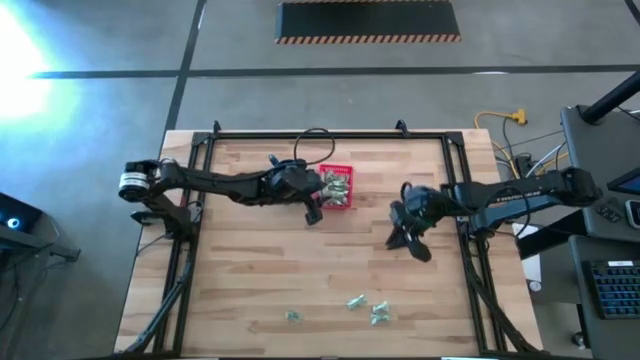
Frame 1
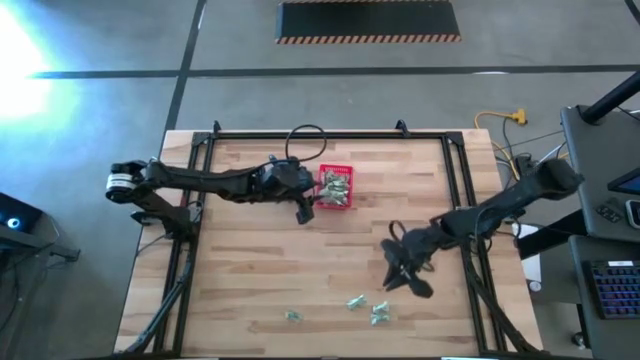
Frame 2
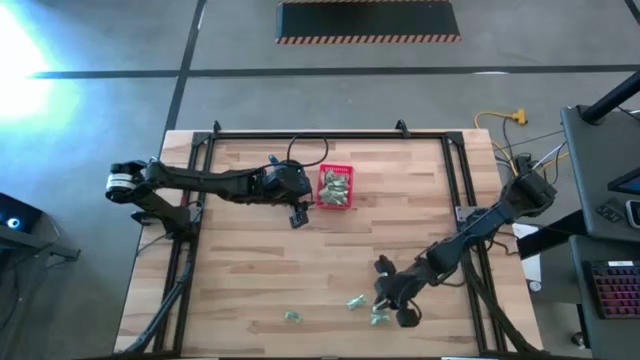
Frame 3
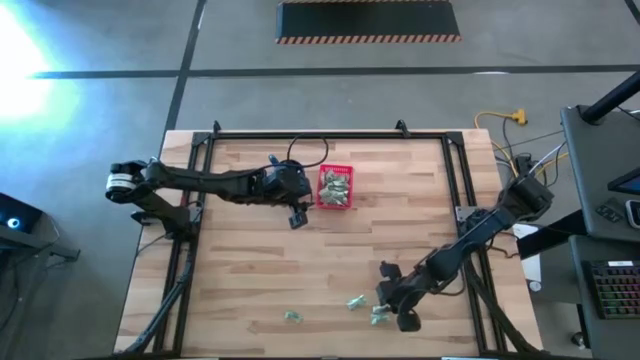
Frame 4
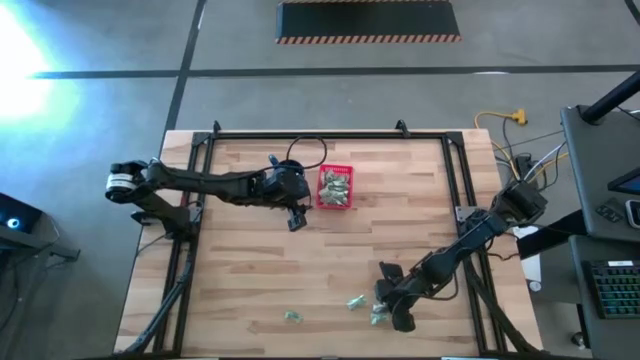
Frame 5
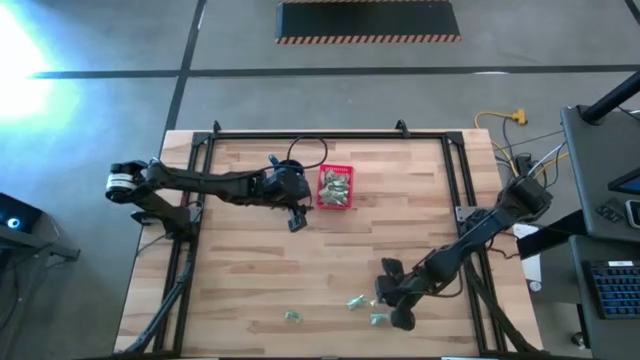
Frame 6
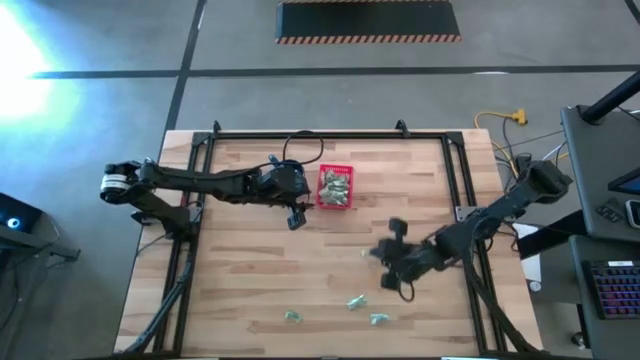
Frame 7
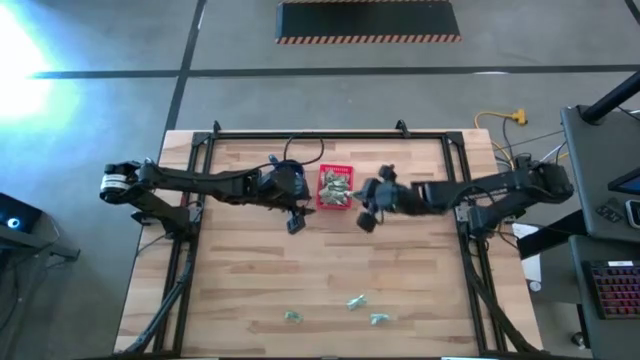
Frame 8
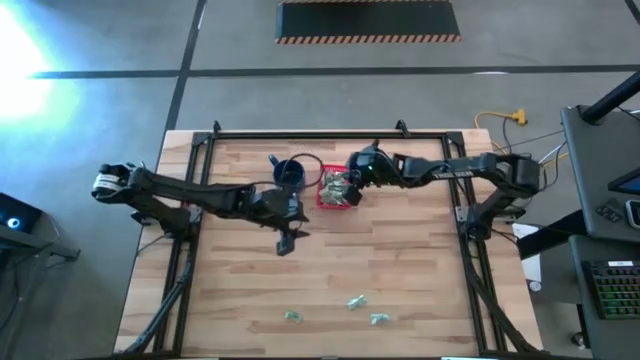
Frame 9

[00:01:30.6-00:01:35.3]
Task: Pick and place Stevia / Truvia into bins
Put the stevia packet into the basket

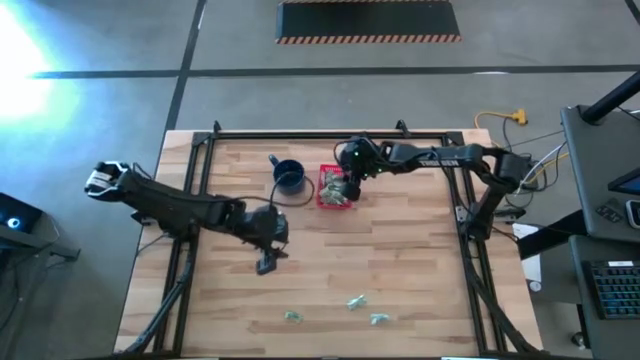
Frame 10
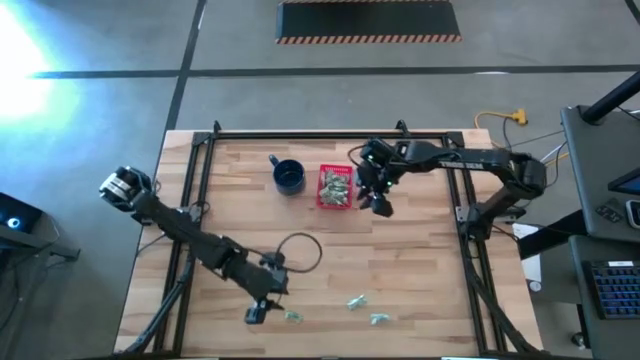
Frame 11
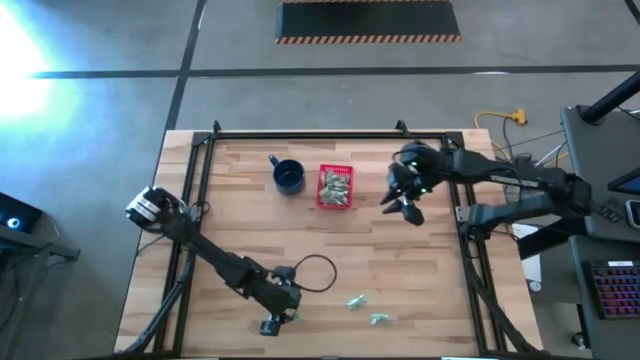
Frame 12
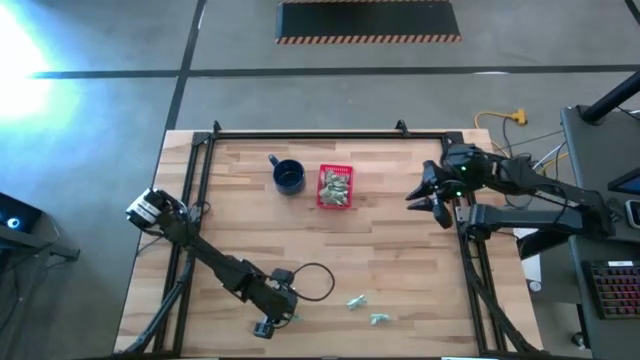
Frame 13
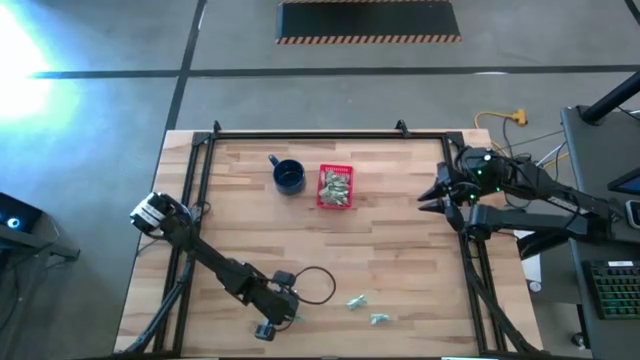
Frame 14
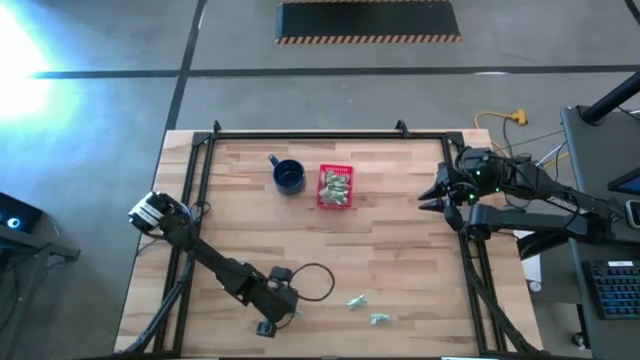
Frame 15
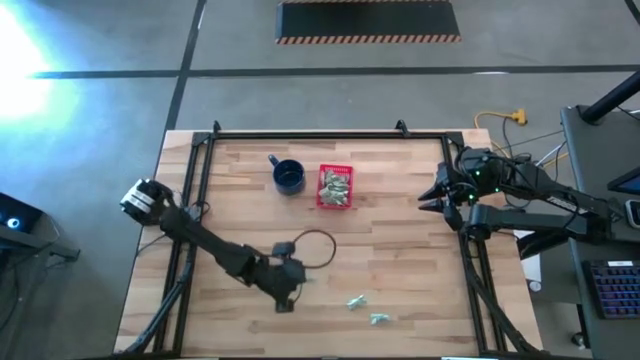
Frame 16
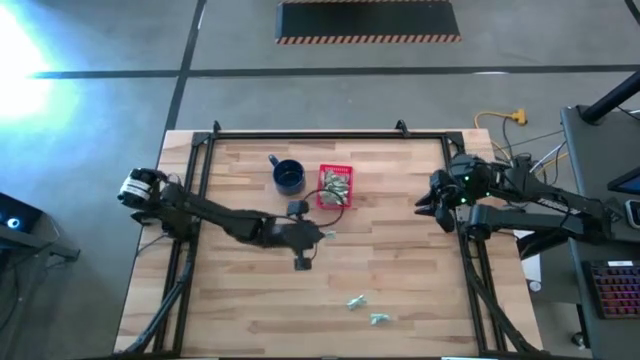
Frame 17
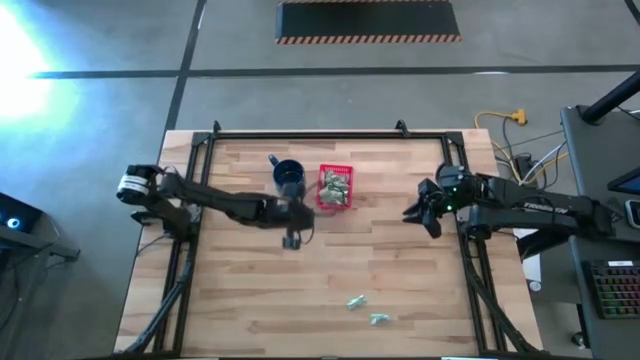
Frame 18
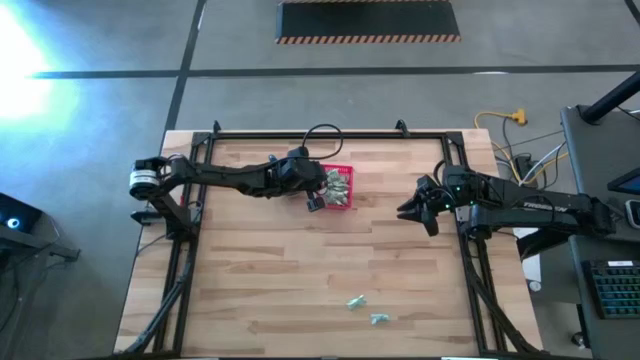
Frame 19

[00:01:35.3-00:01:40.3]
Put the stevia packet into the basket

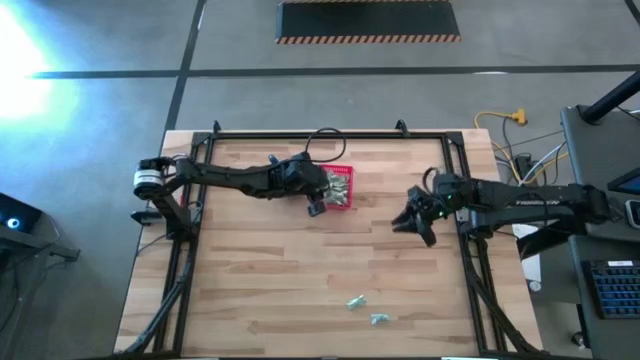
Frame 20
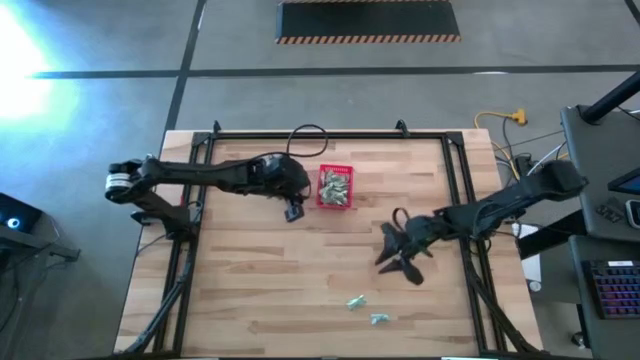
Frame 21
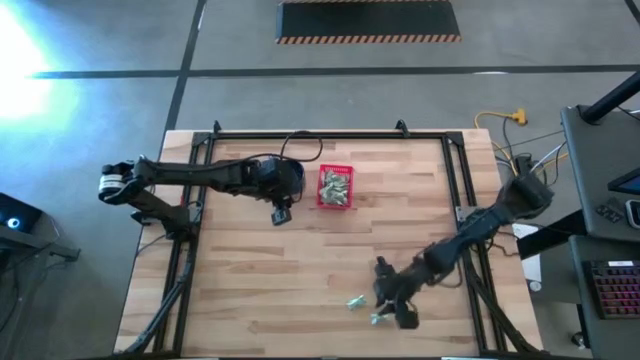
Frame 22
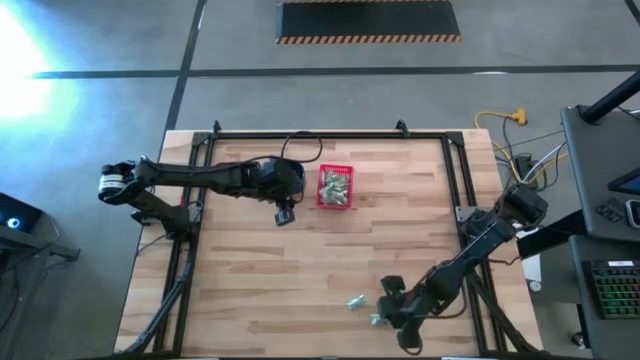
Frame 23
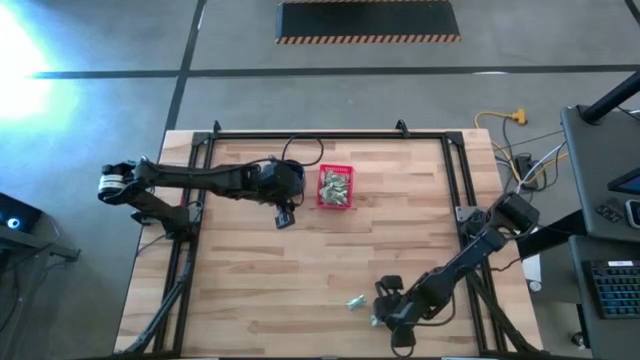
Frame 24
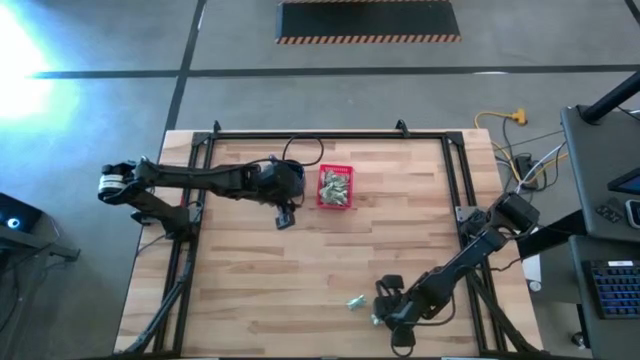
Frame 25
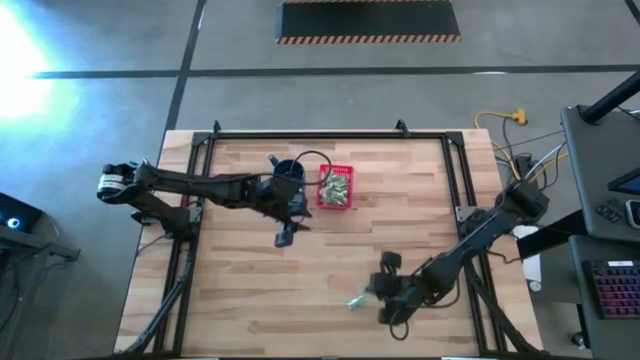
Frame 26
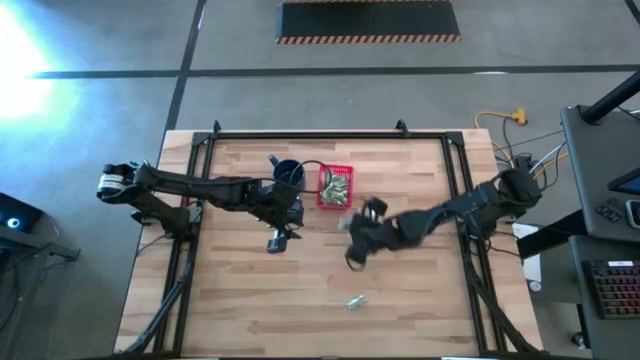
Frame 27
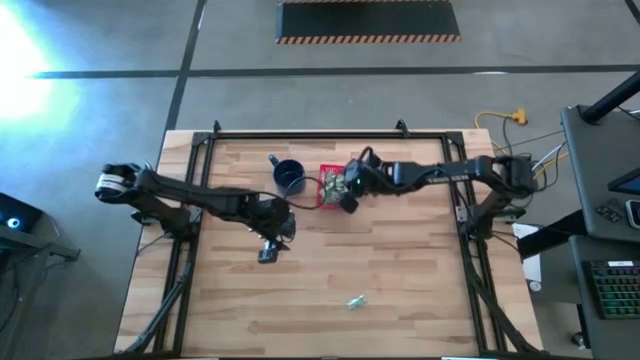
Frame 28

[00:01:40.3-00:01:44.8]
Put the stevia packet into the basket

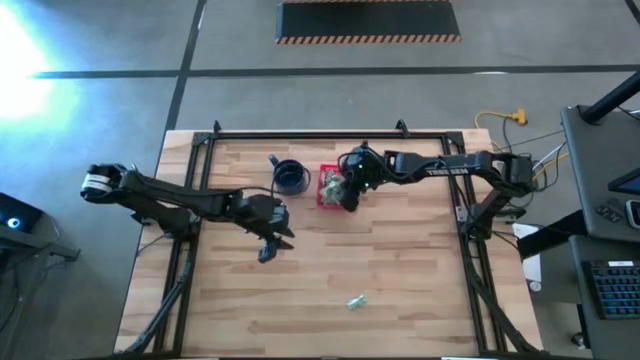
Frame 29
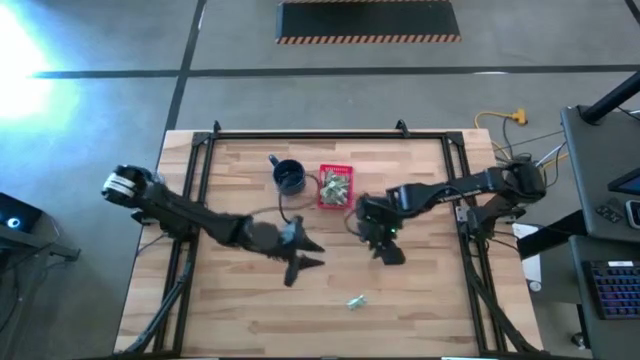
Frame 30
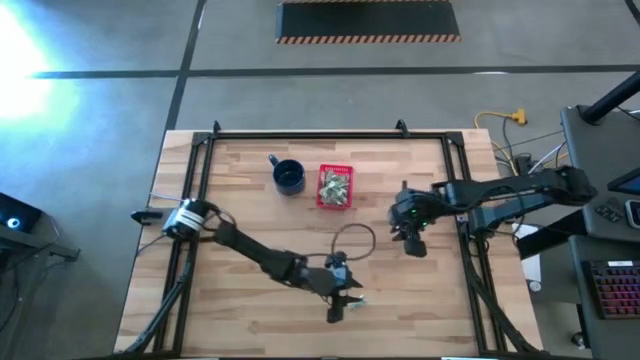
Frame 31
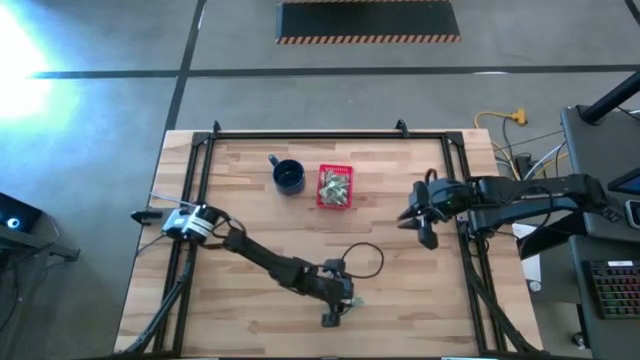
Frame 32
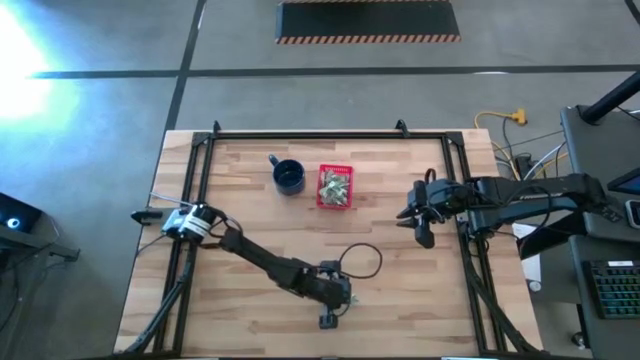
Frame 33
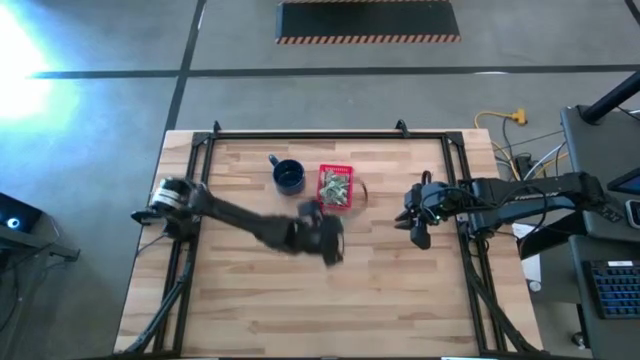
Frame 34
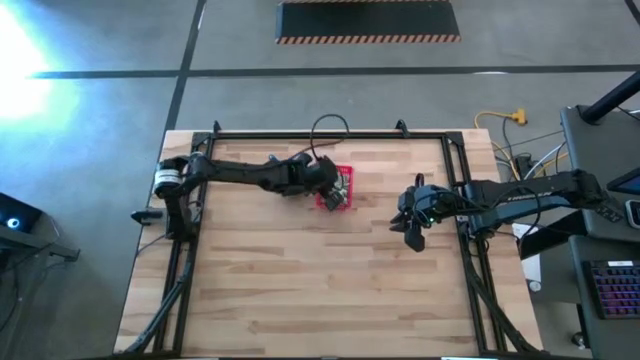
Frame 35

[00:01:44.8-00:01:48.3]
Put the stevia packet into the basket

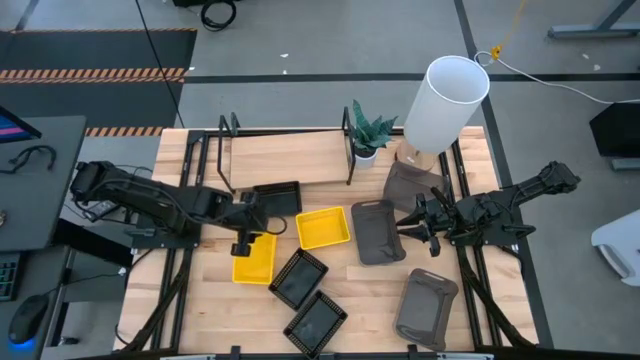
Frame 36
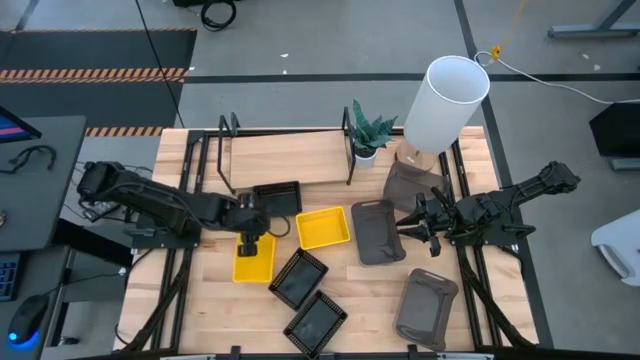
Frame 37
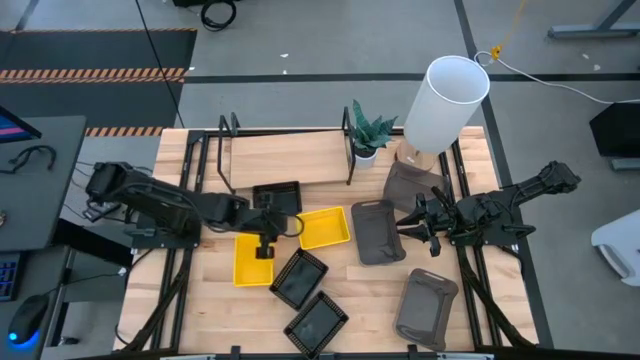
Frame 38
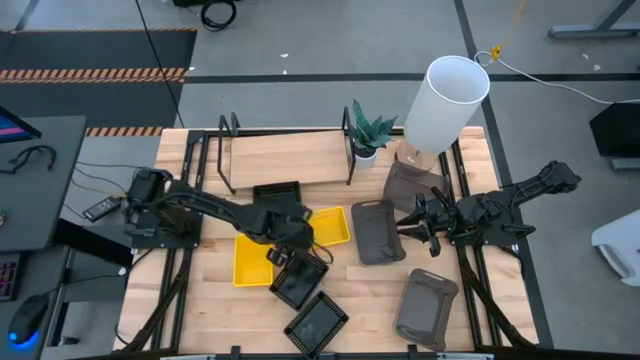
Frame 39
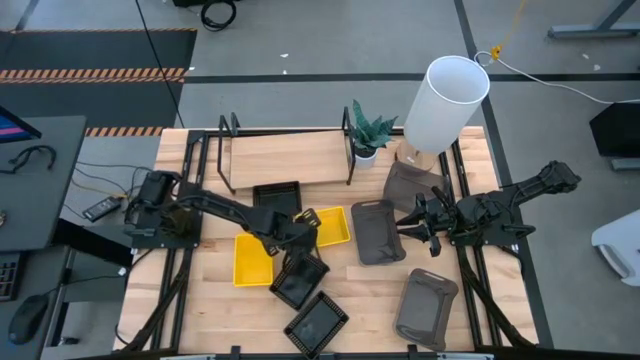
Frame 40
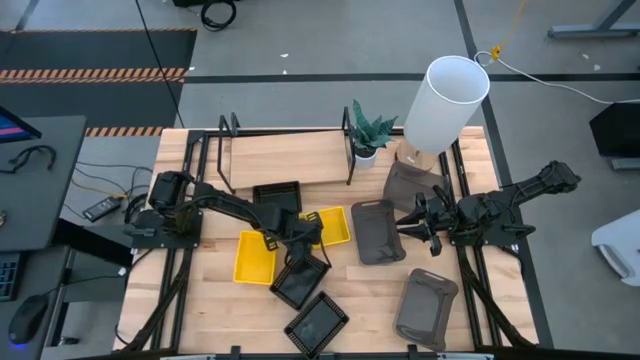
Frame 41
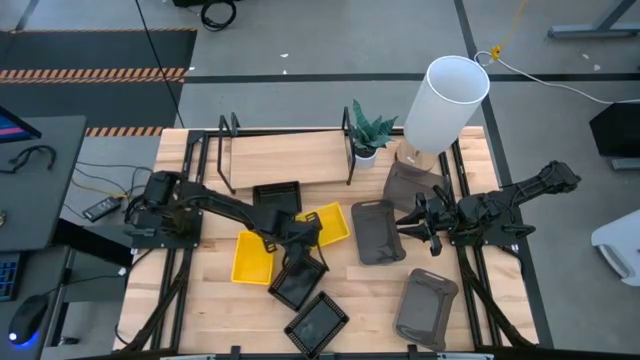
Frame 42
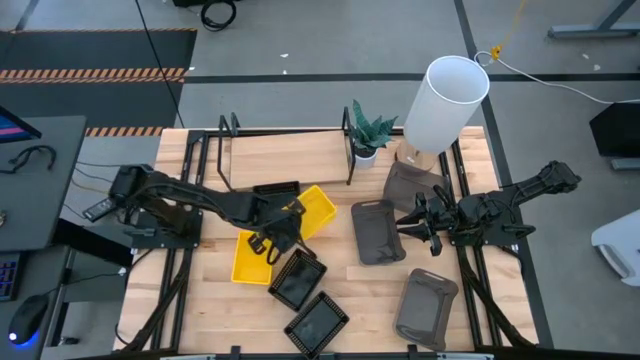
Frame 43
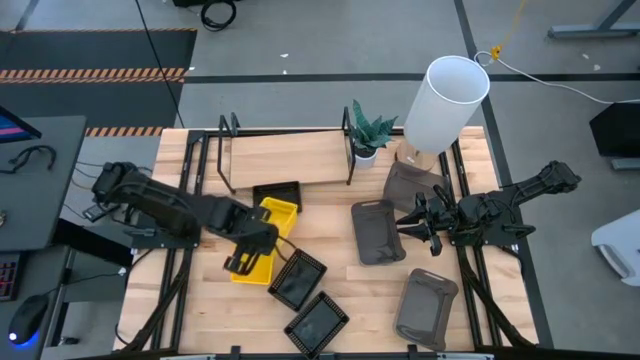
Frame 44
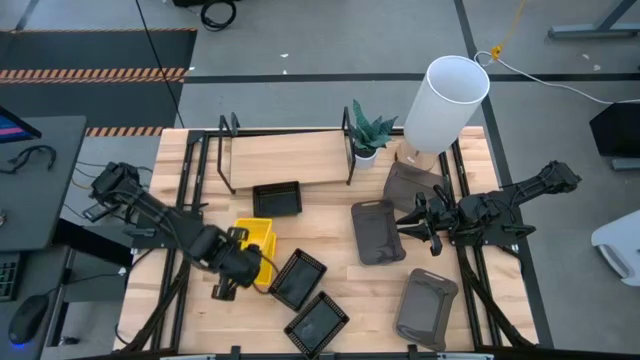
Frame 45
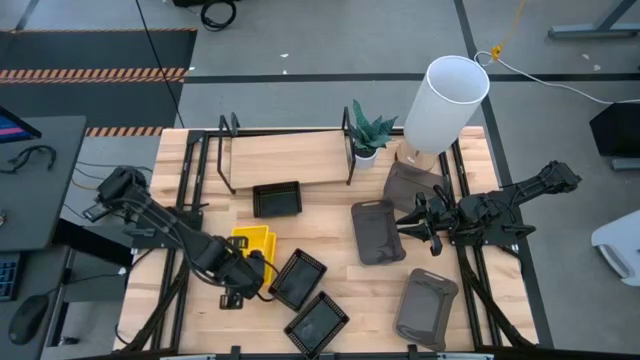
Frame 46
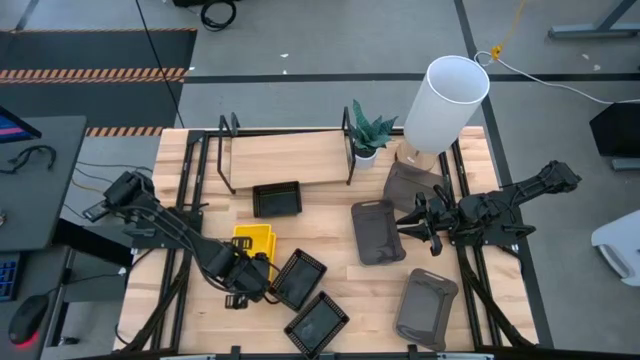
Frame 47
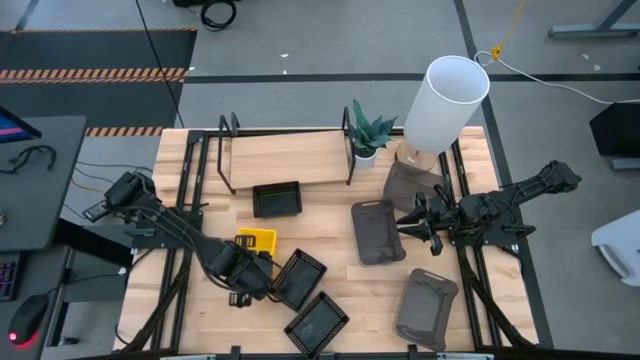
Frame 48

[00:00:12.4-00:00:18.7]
Task: Stack baskets on shelf by color
Stack the right yellow bin on the left yellow bins
